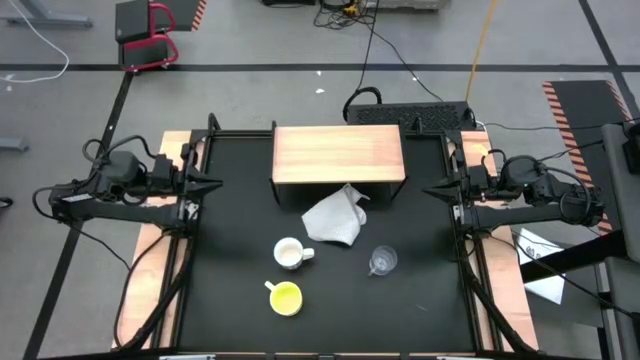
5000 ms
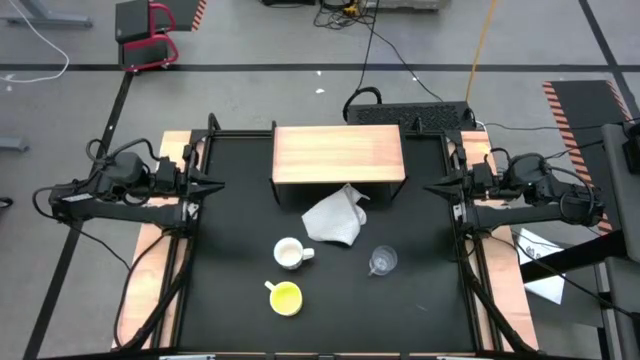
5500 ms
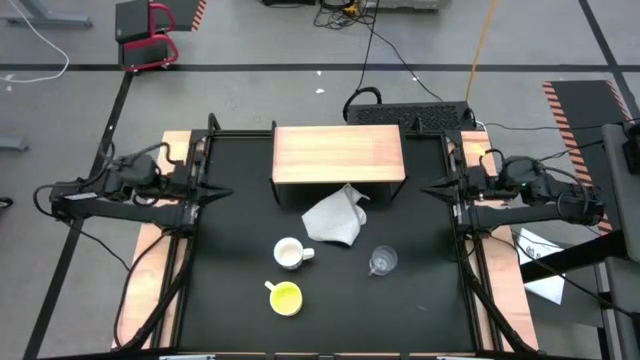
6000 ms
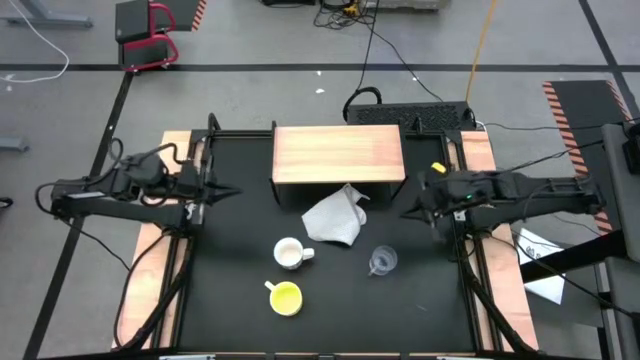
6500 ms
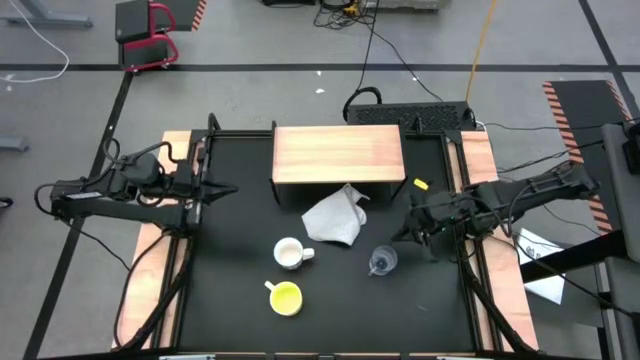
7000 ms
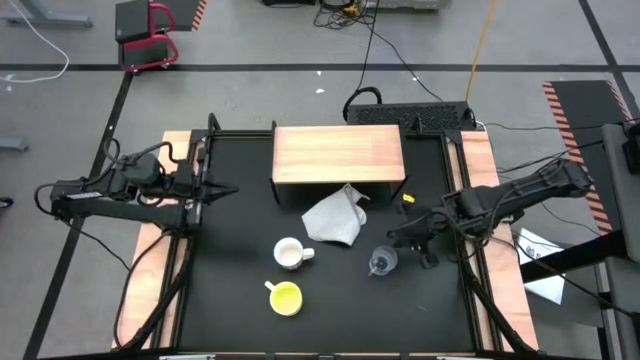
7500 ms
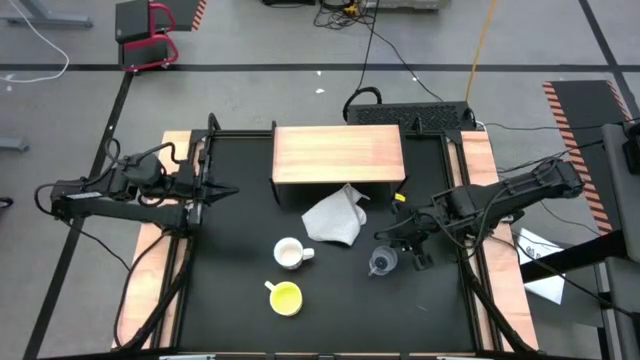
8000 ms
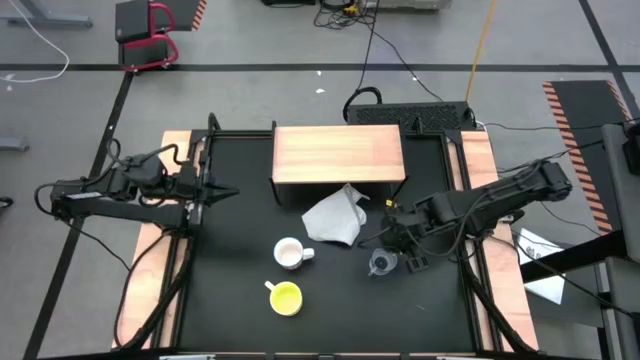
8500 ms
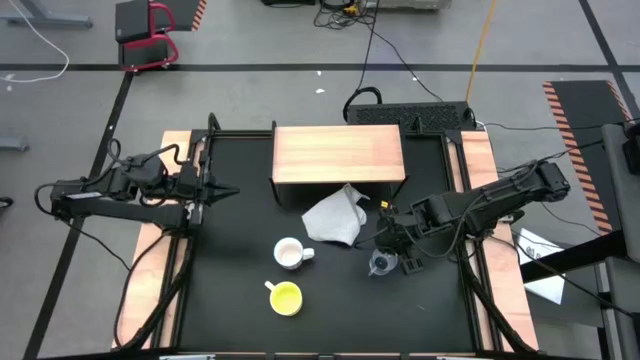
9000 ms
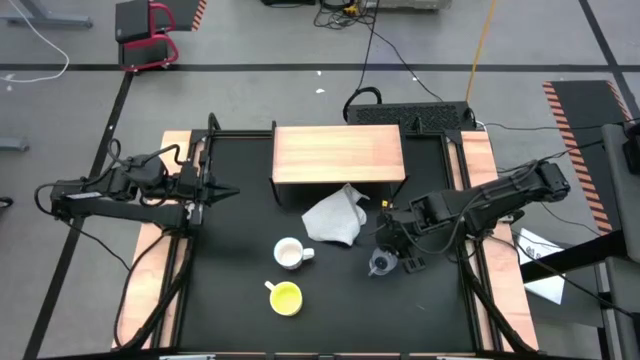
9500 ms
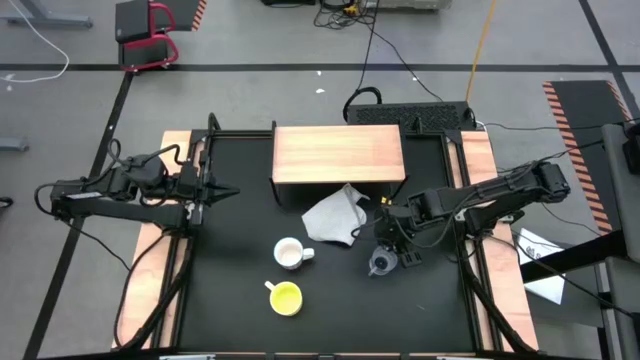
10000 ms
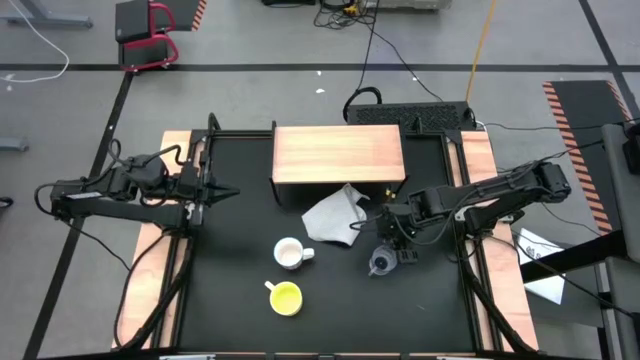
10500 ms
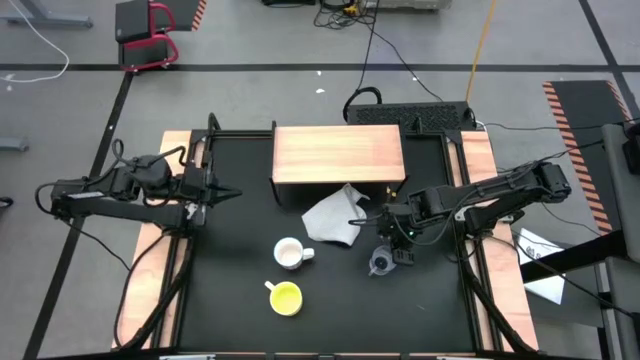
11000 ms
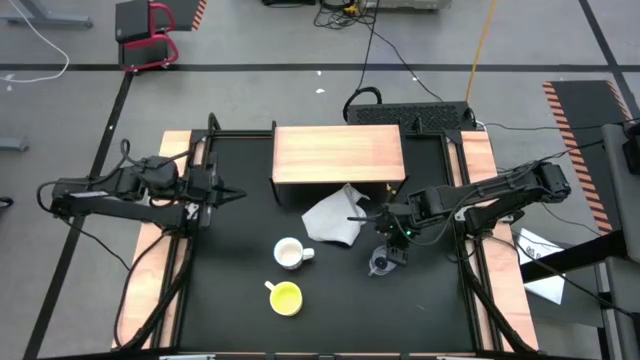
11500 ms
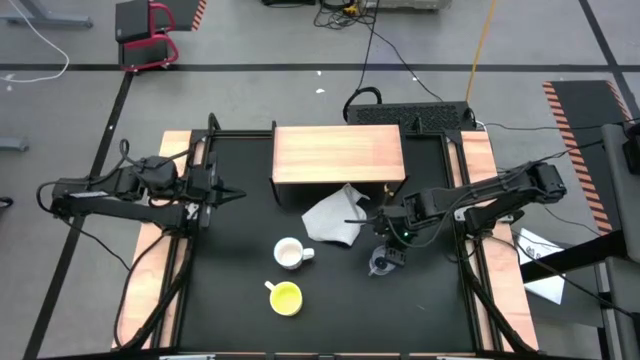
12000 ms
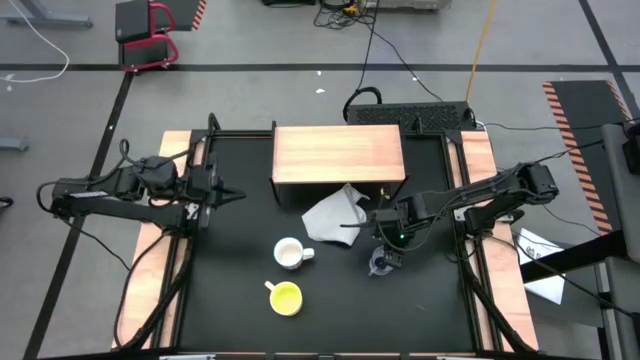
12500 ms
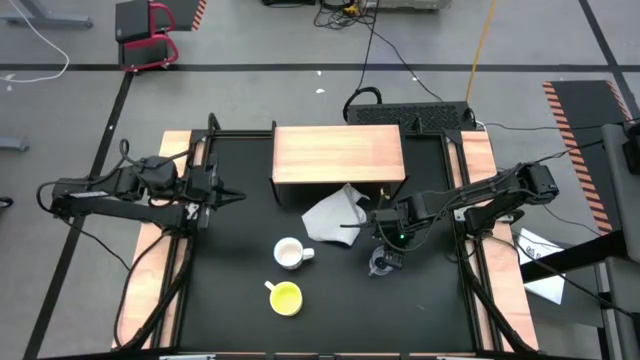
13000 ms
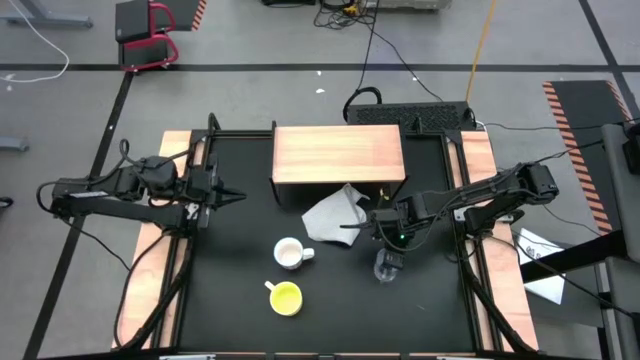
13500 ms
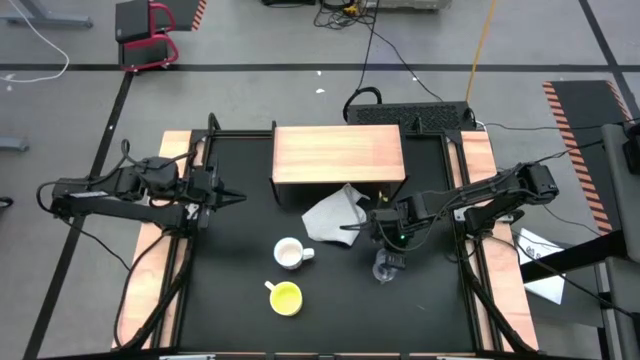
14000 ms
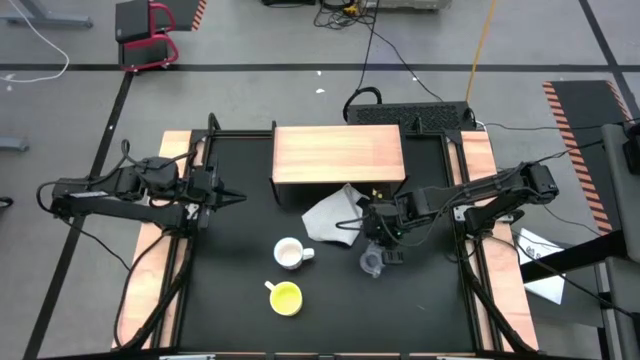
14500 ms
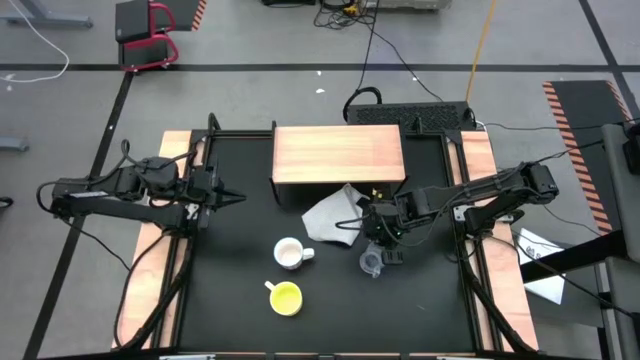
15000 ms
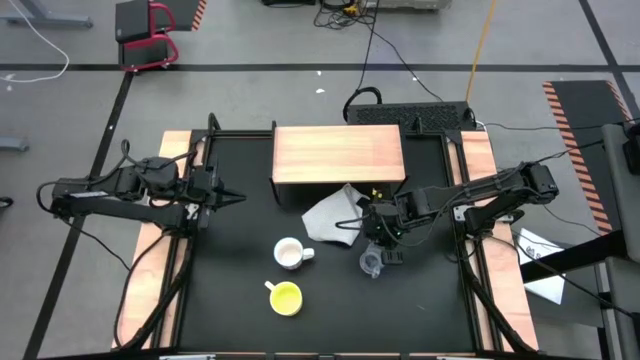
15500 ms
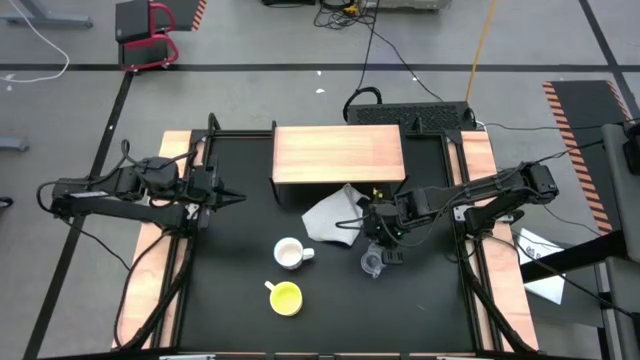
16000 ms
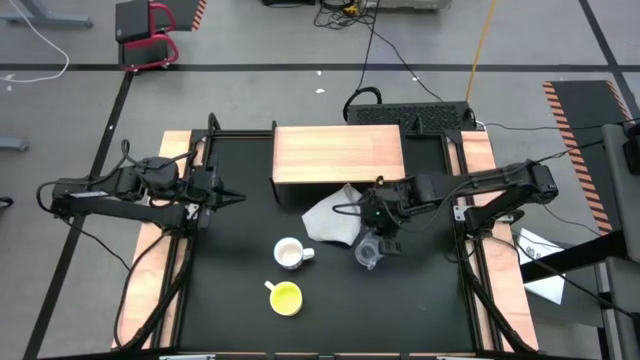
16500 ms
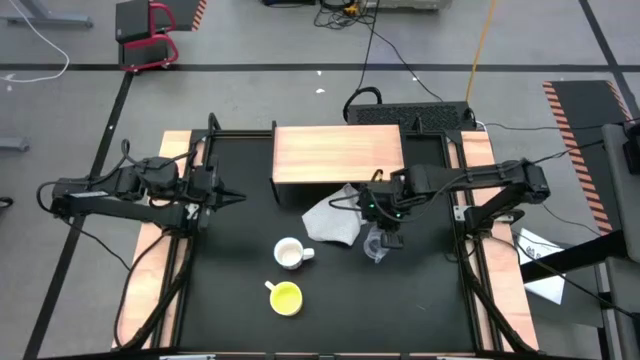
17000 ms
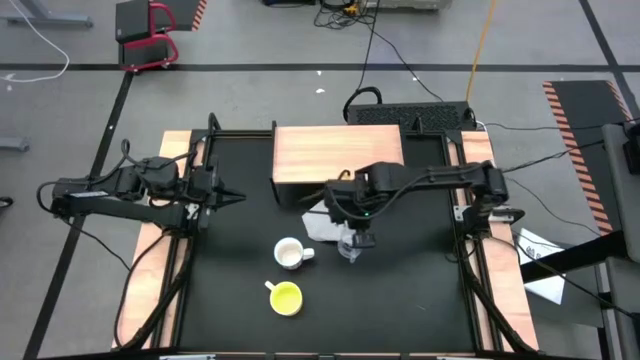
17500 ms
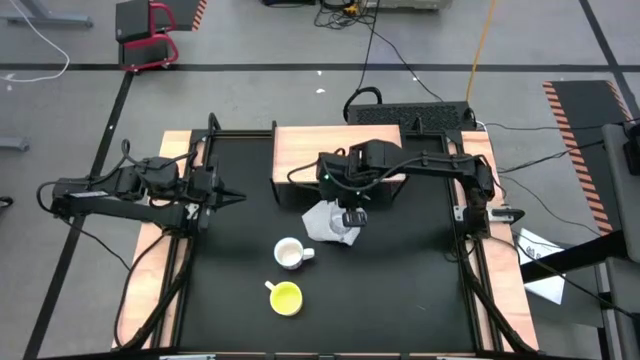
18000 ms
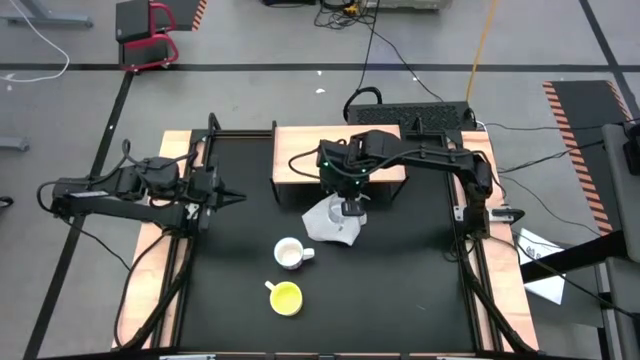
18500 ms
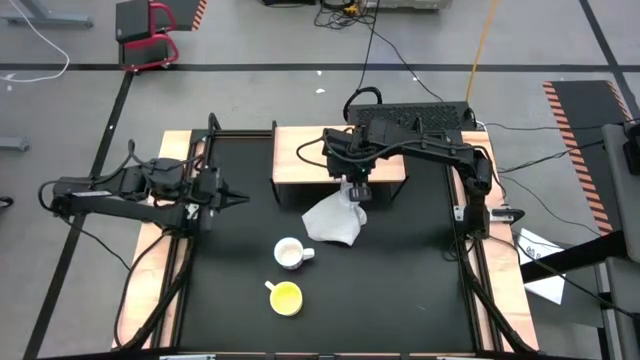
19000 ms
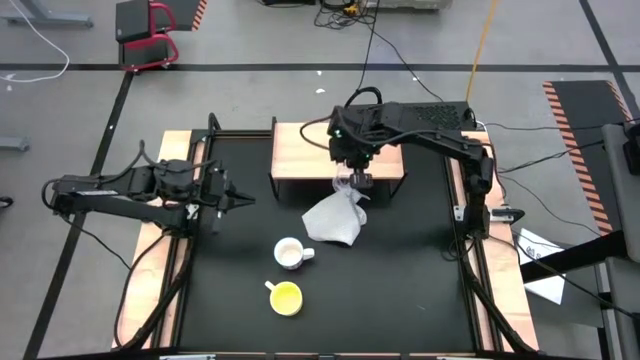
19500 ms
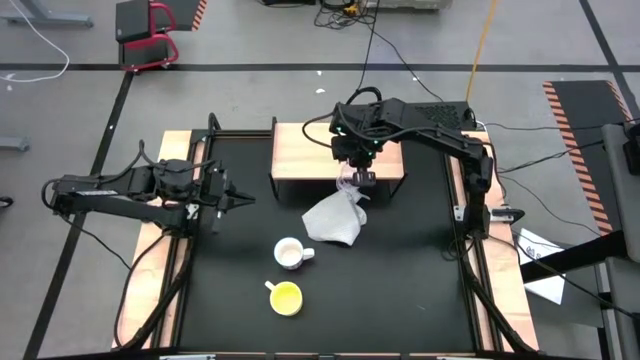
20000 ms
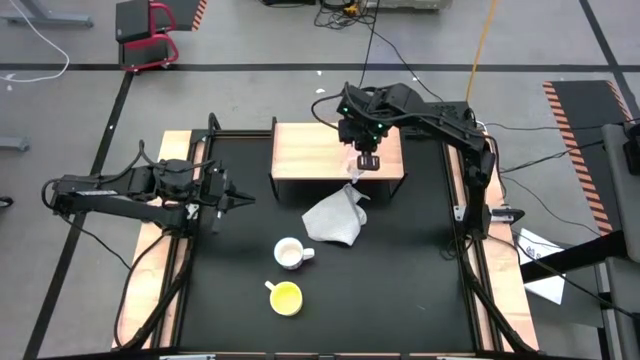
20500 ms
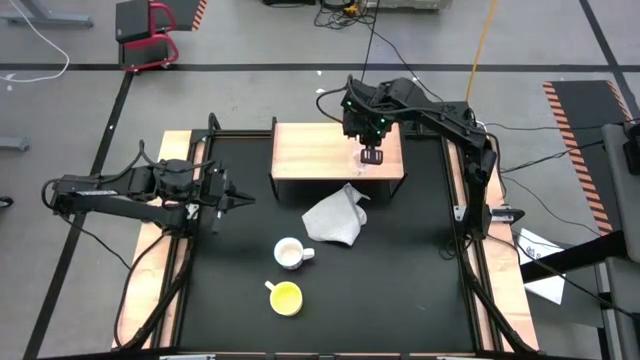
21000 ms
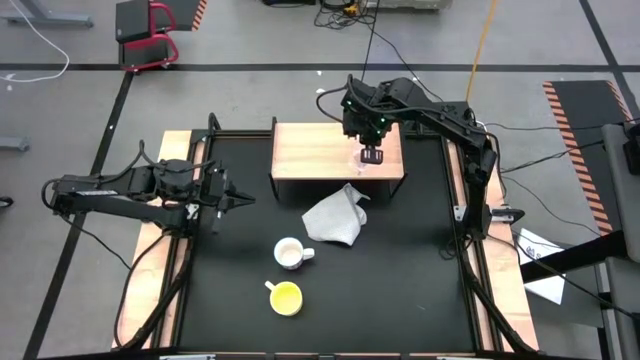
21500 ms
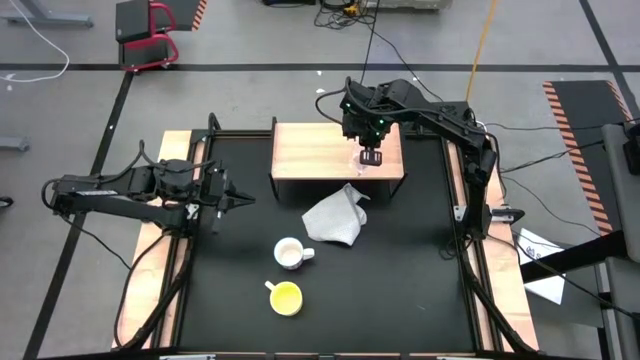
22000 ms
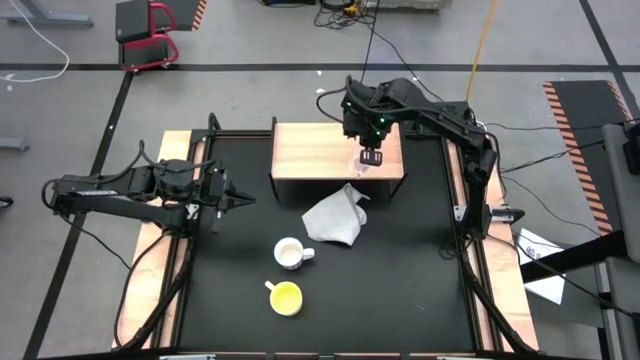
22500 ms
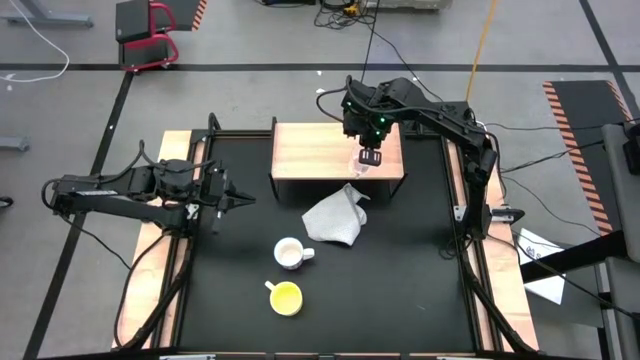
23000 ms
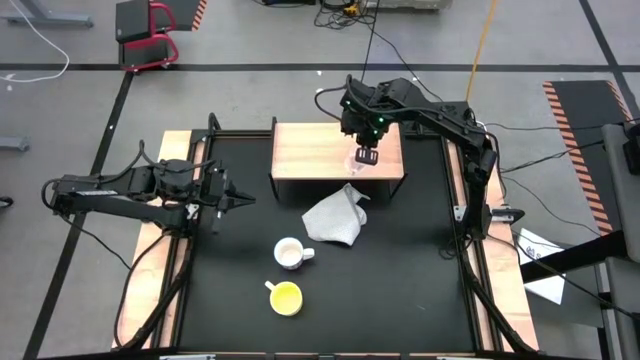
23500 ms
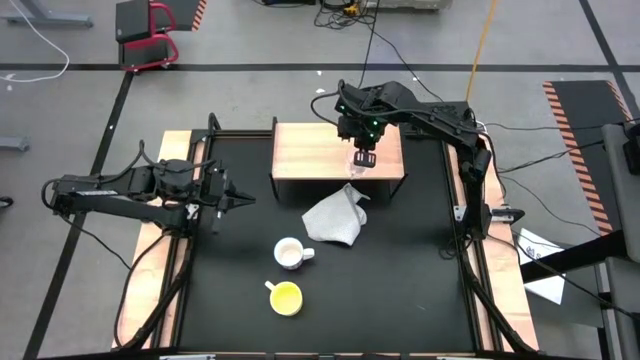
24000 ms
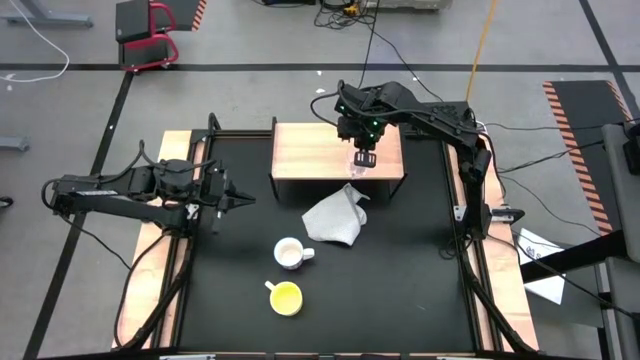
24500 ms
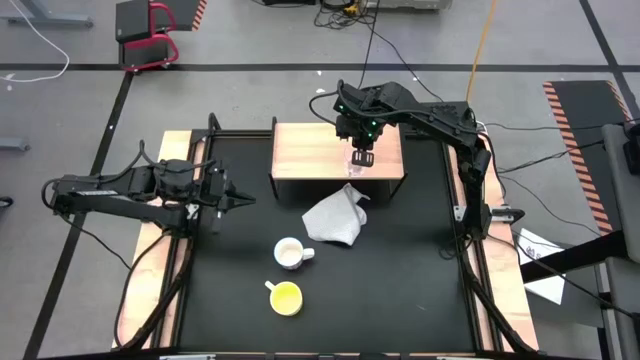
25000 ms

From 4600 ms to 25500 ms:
Task: Stack small to large cups/mugs on shelf
Put the transparent mug on the shelf
